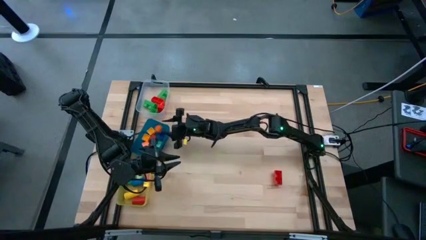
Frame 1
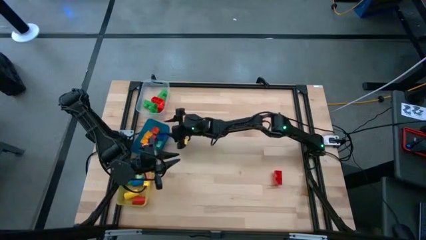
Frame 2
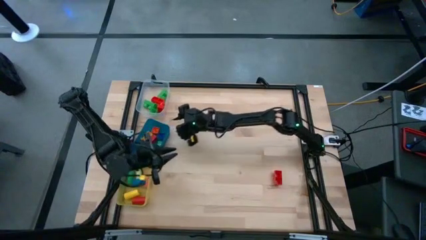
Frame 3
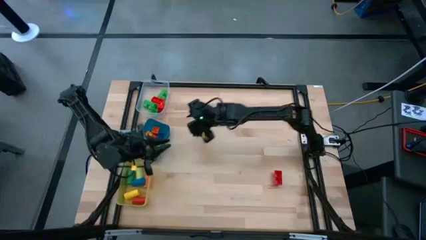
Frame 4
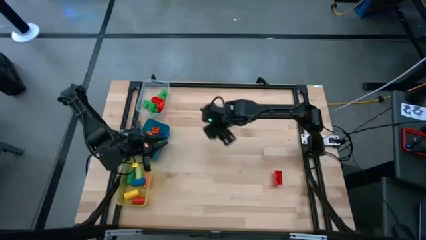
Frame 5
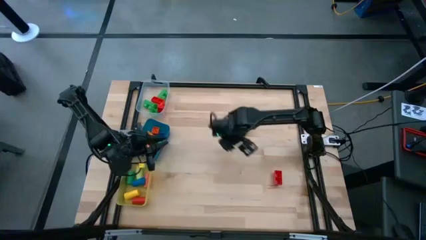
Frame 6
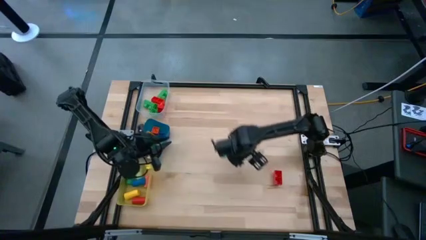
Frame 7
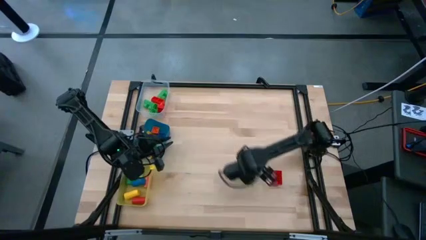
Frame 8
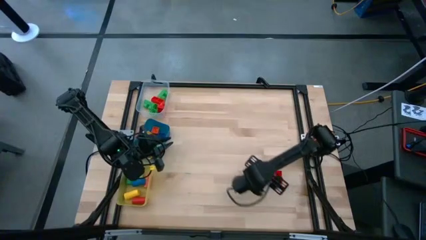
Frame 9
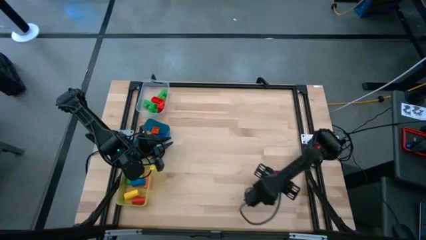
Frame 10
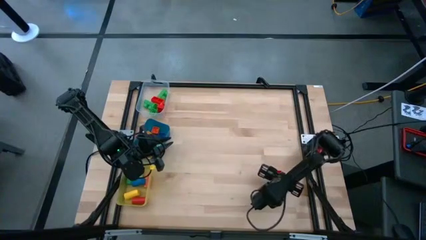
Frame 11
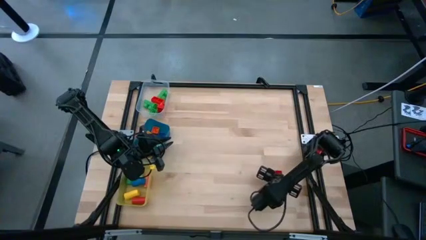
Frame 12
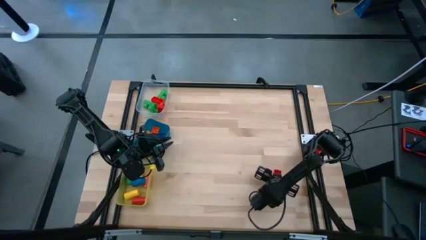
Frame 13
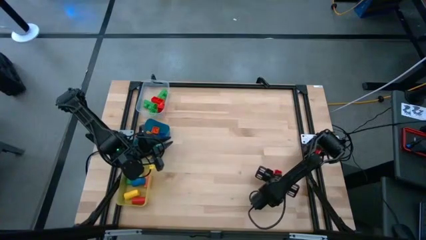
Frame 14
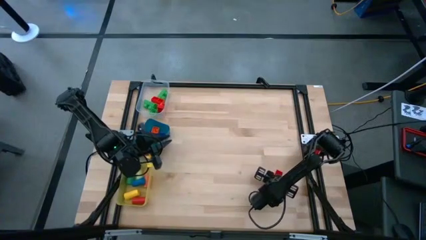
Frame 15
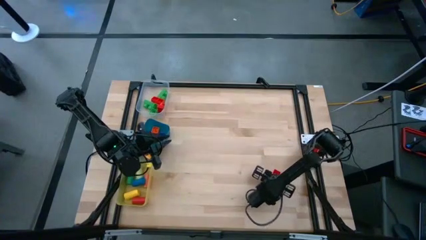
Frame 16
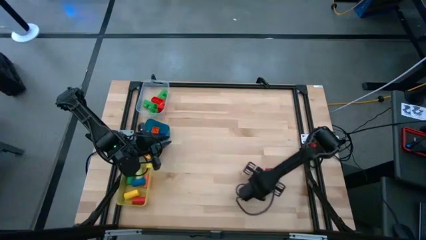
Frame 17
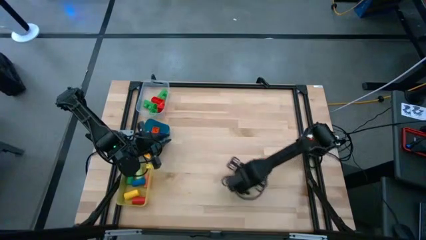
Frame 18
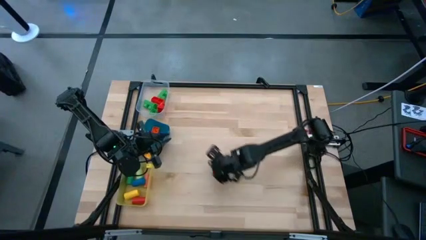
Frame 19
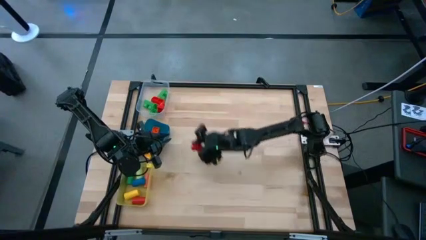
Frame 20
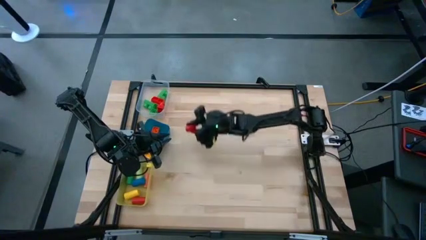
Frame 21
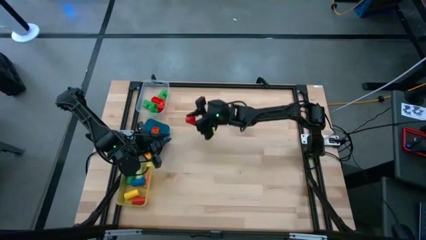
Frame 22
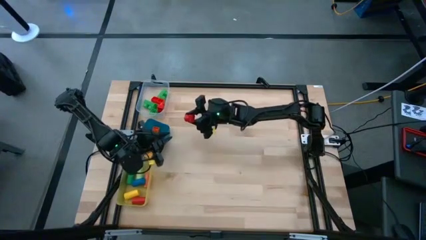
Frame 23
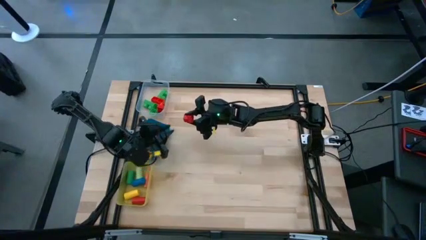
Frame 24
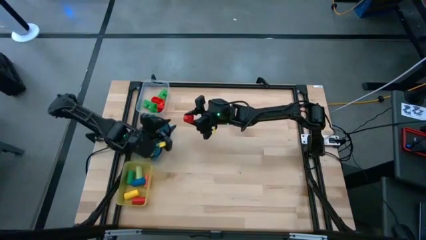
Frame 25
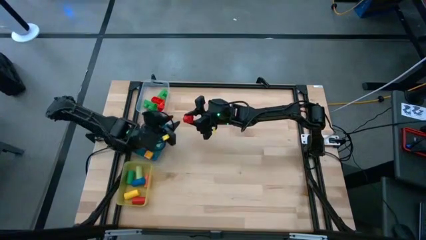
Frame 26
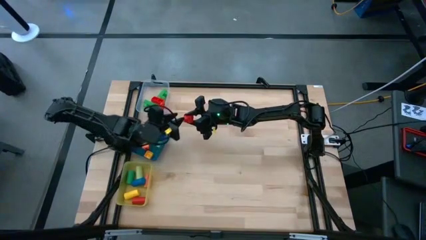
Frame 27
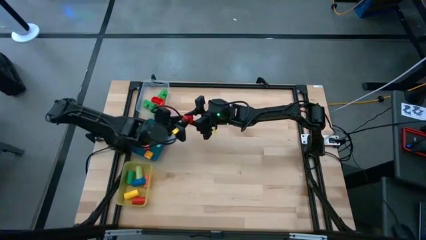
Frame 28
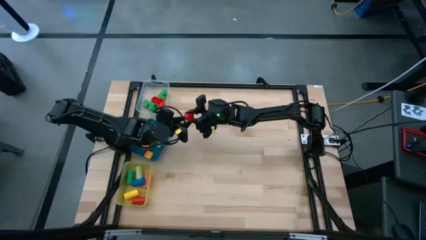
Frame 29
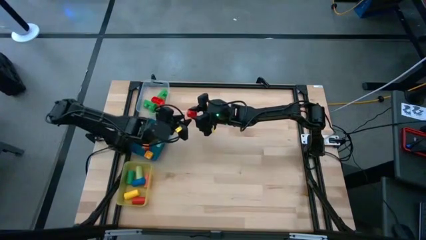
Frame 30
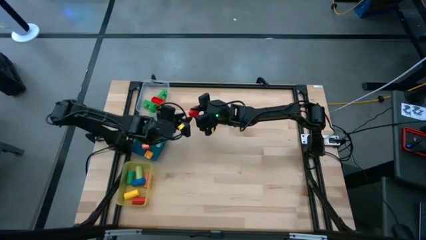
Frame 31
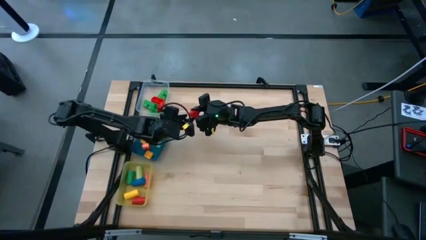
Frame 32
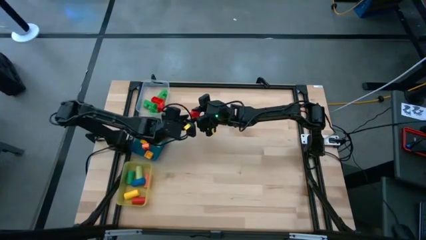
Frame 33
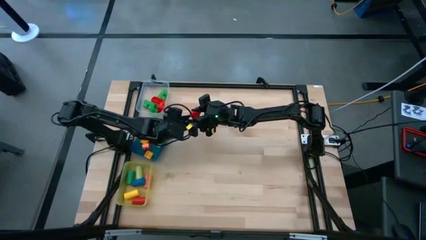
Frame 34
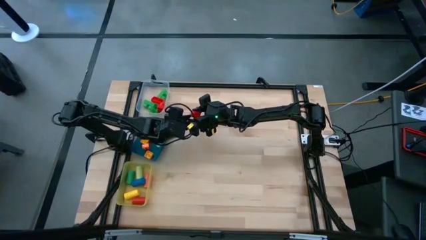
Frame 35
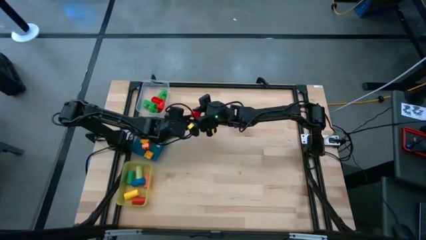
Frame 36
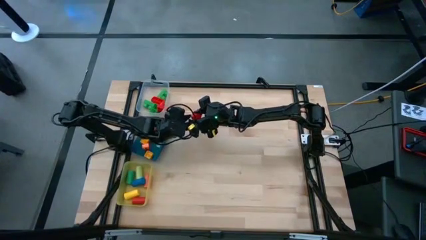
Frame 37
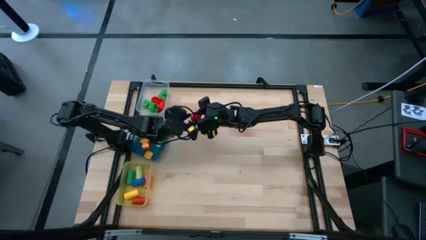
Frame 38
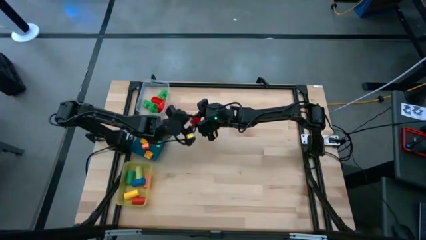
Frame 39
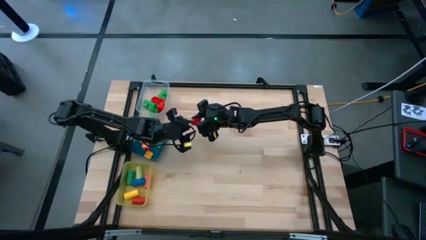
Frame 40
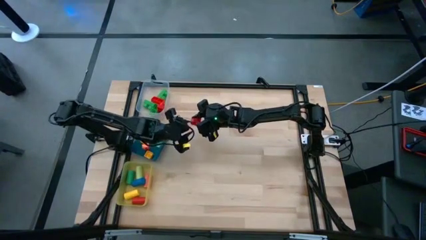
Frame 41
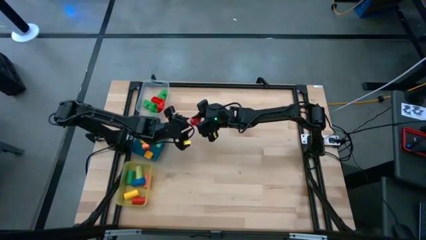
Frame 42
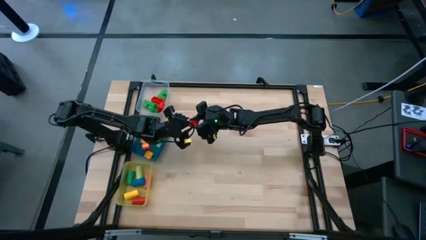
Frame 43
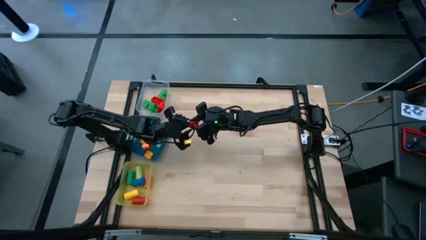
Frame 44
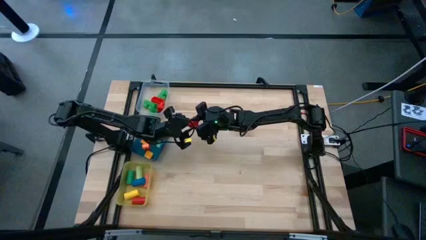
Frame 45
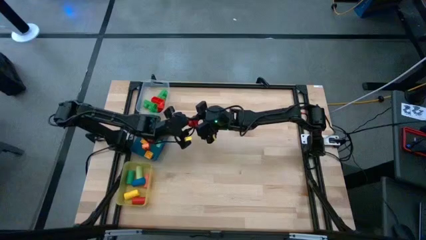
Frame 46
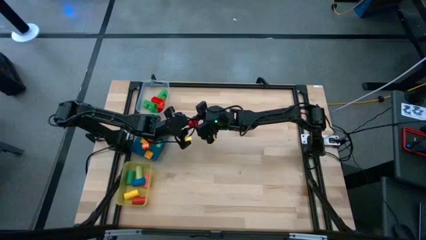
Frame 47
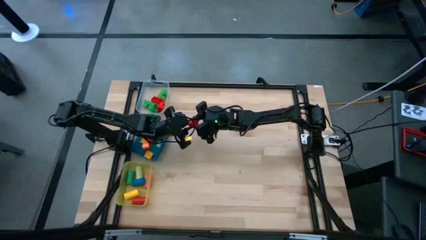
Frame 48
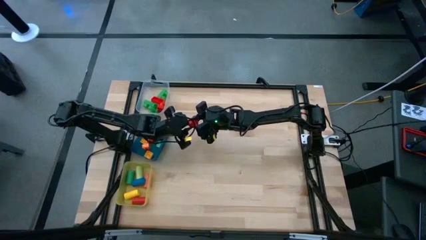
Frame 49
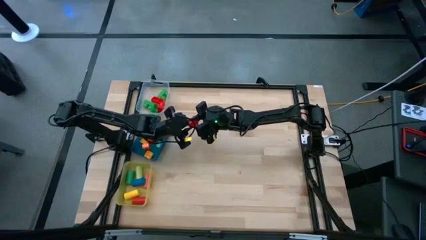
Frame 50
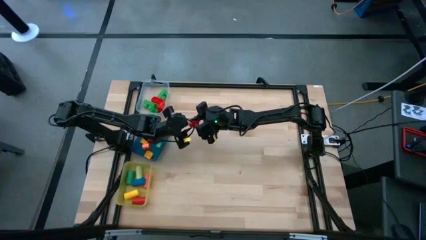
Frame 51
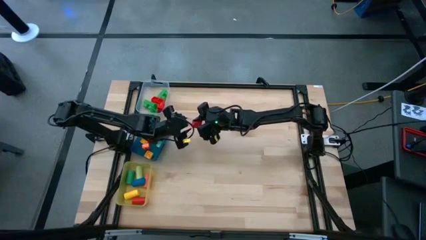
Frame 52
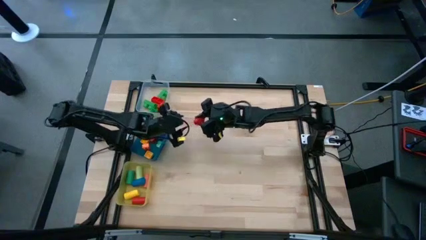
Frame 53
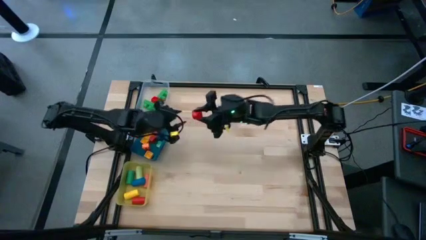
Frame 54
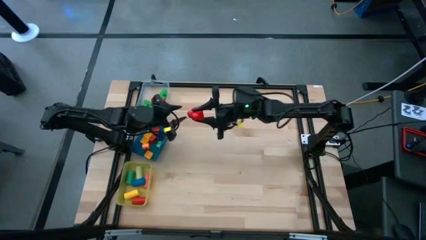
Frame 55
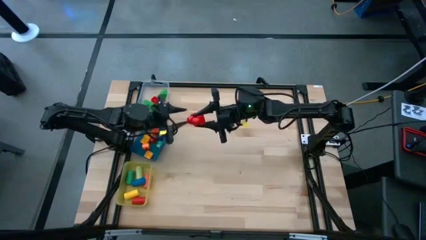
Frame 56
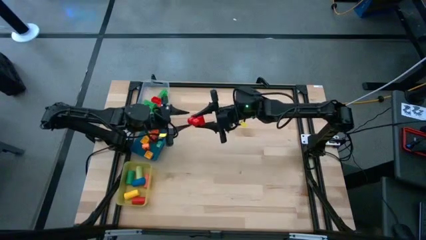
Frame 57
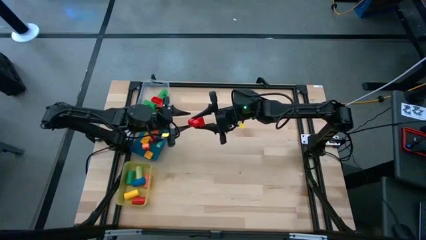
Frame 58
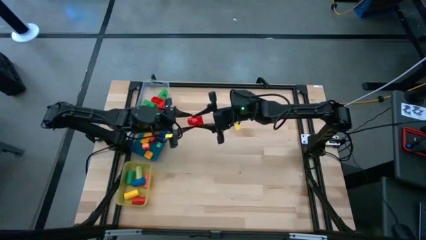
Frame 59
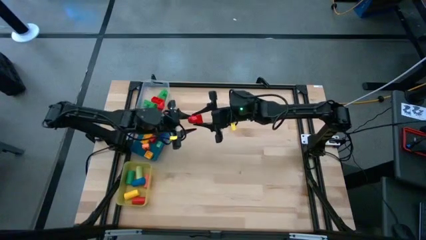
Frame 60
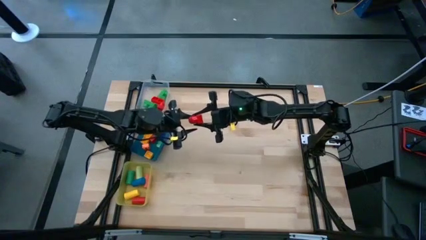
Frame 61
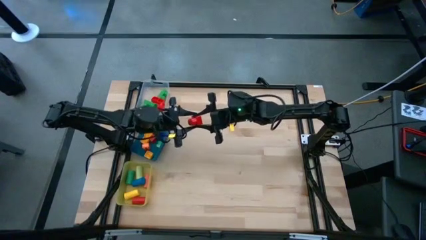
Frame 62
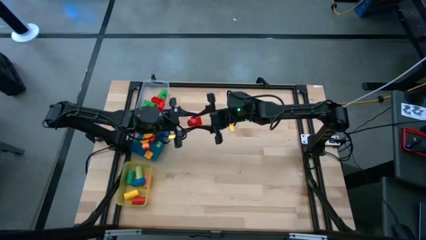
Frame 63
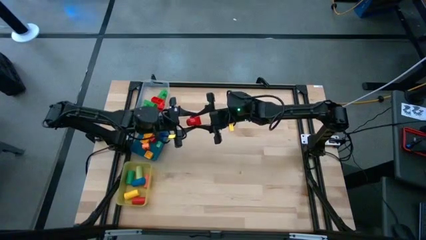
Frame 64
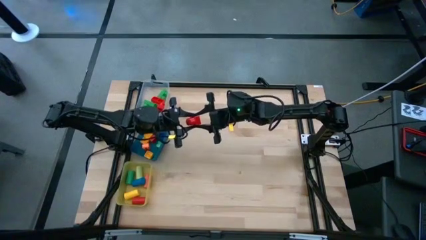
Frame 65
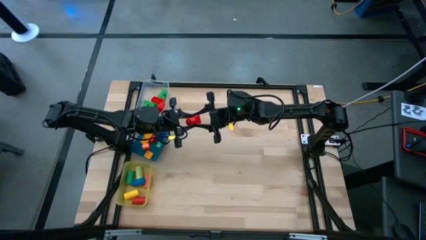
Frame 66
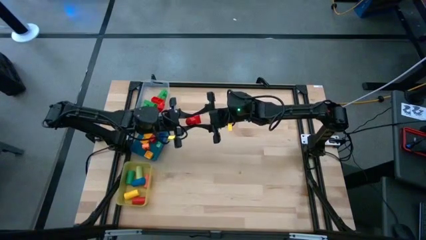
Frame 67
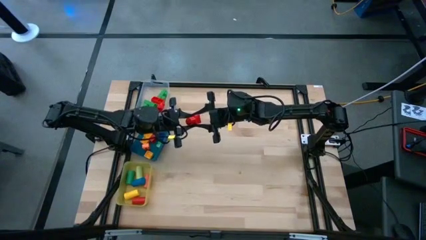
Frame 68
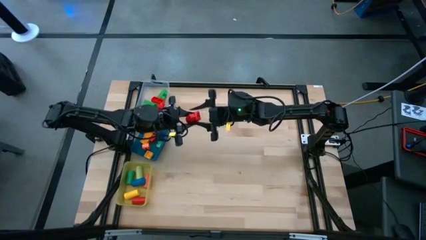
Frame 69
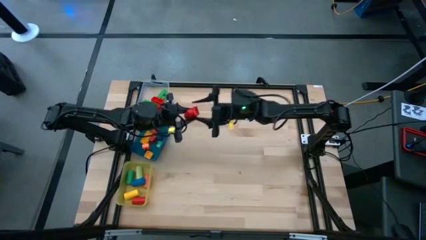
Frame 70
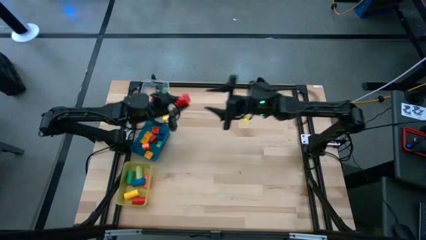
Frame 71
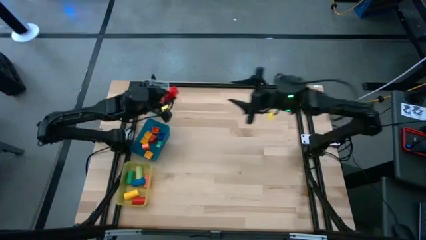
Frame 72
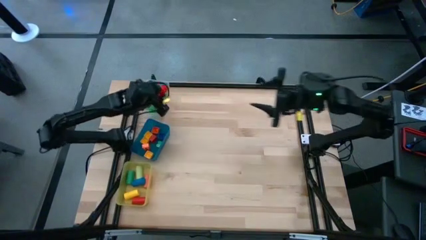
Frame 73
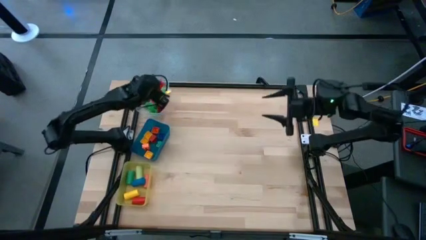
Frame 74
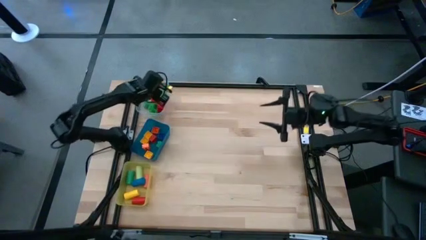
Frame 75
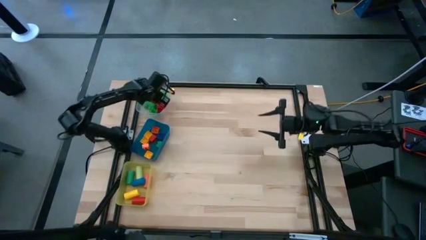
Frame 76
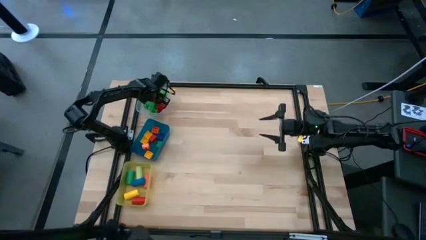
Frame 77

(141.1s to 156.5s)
Task: Sort blocks by size
Put the red 2 stud game piece into the transparent bin
